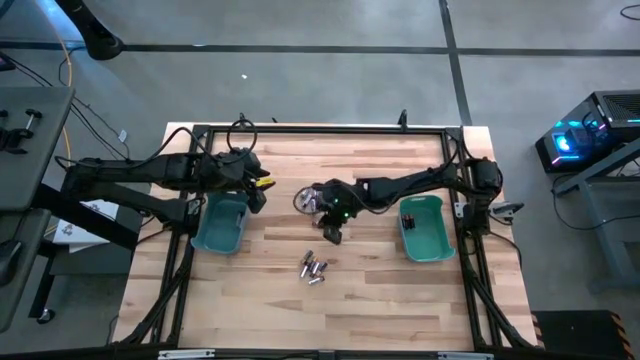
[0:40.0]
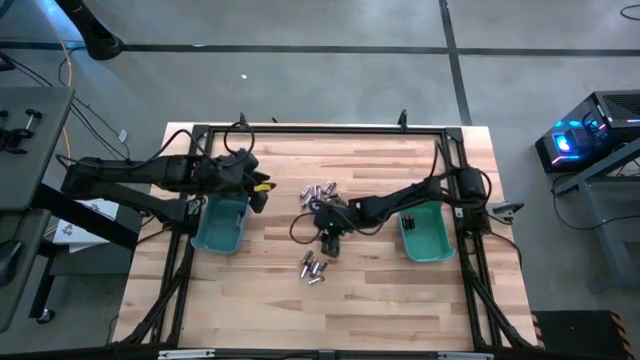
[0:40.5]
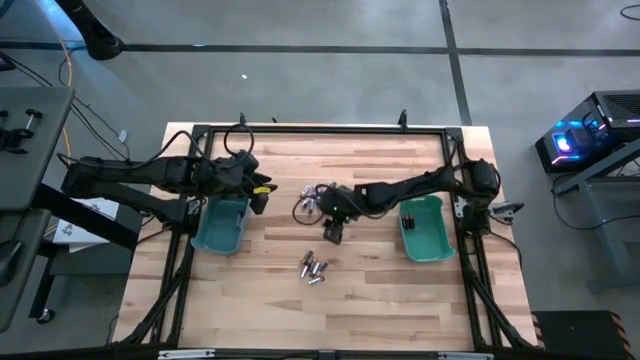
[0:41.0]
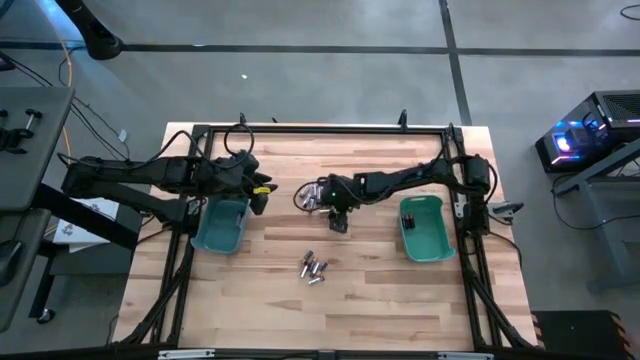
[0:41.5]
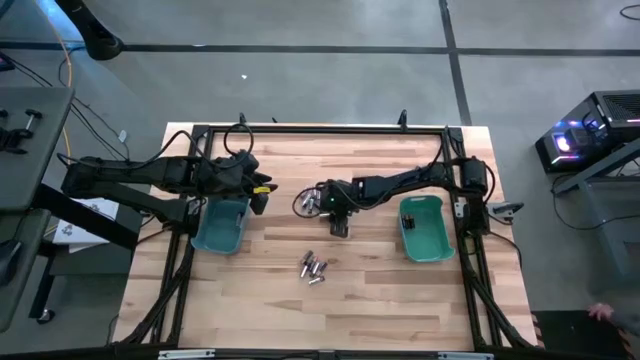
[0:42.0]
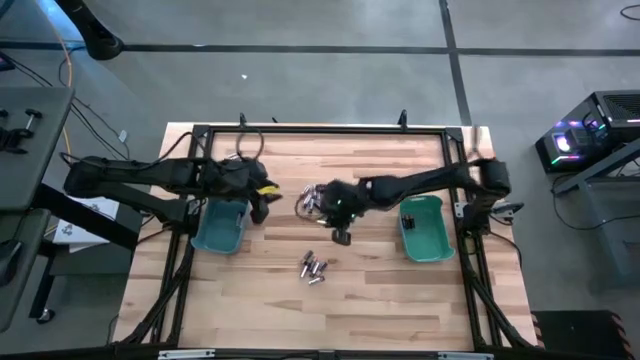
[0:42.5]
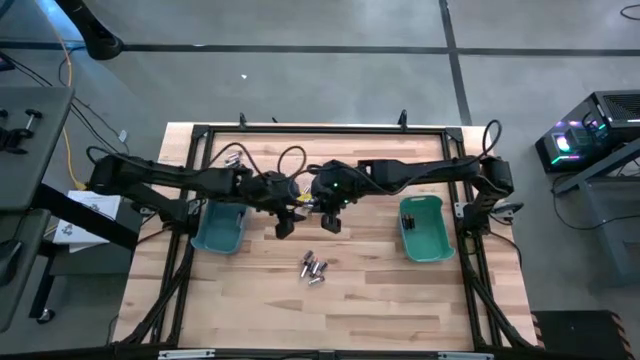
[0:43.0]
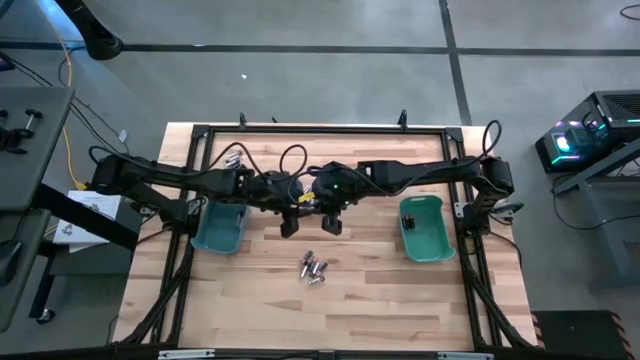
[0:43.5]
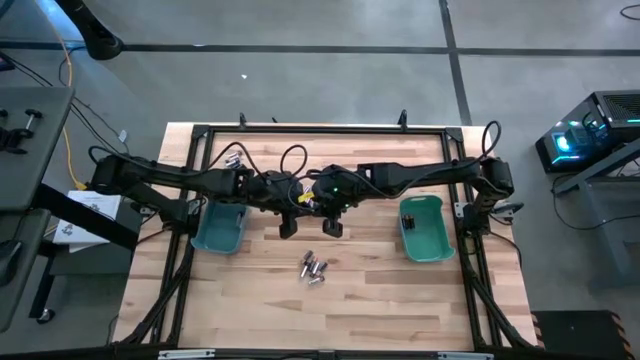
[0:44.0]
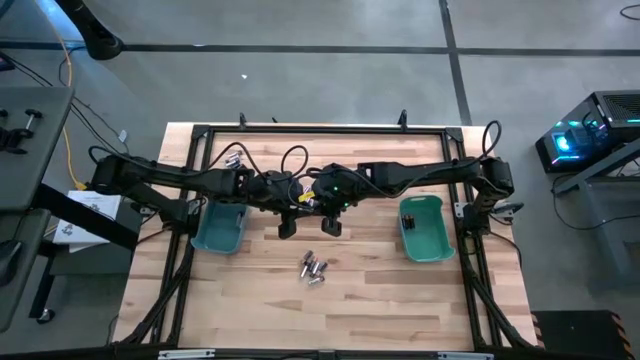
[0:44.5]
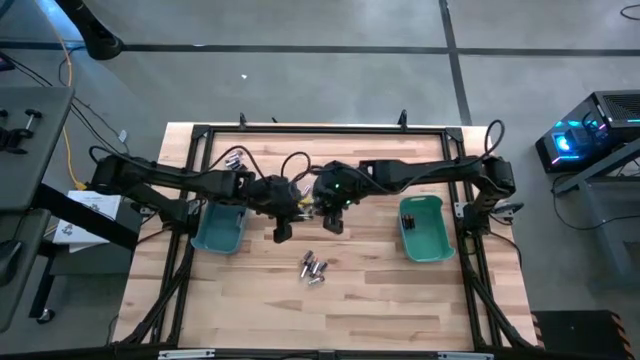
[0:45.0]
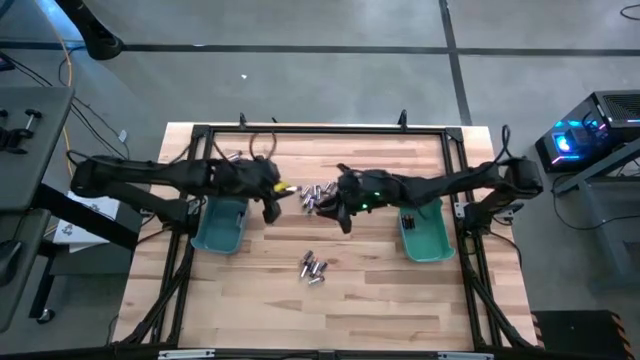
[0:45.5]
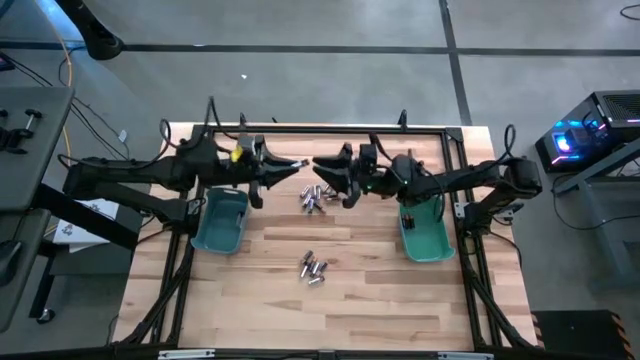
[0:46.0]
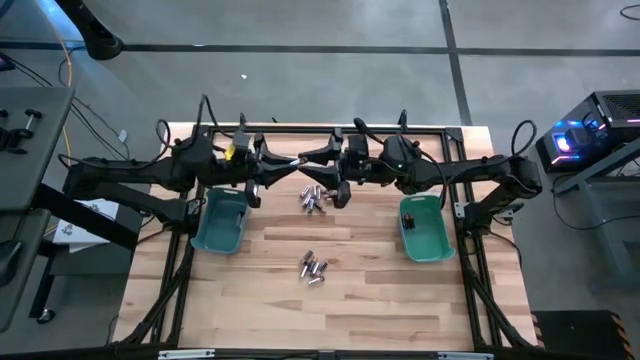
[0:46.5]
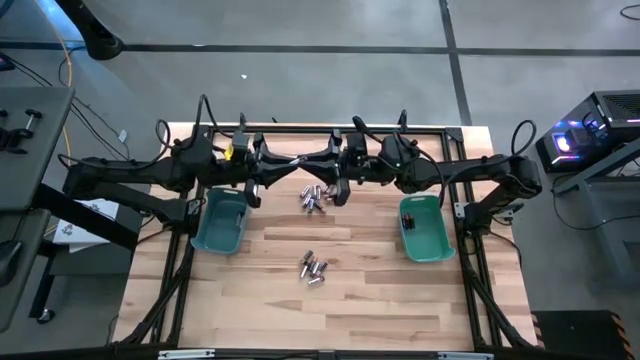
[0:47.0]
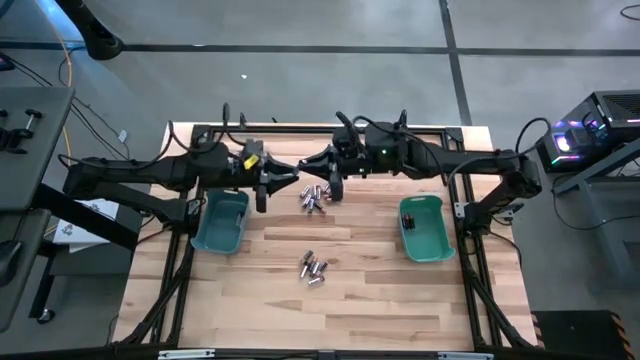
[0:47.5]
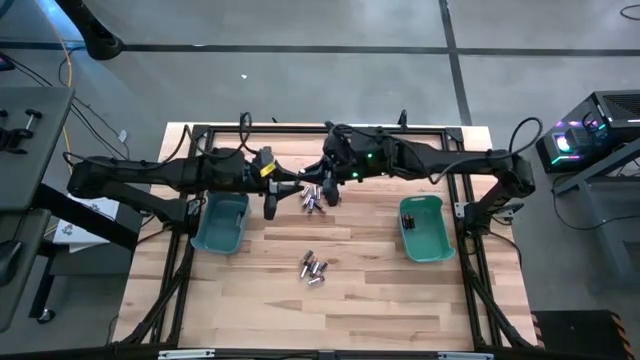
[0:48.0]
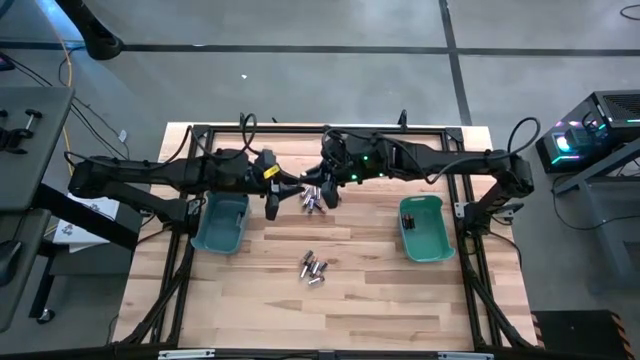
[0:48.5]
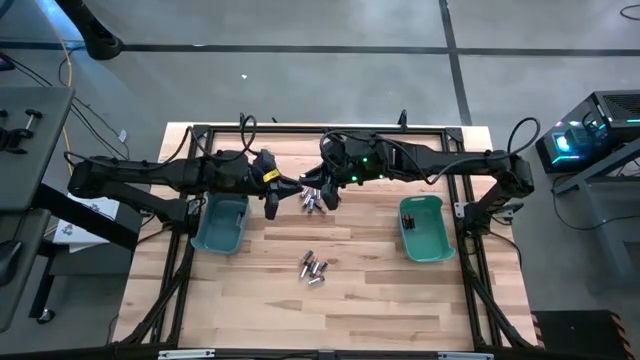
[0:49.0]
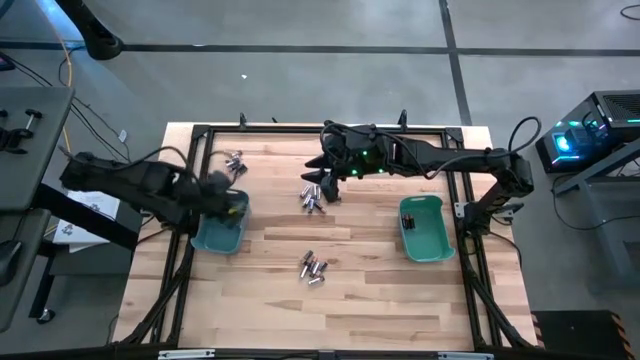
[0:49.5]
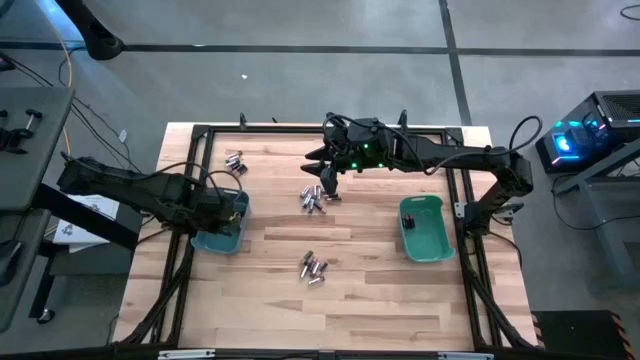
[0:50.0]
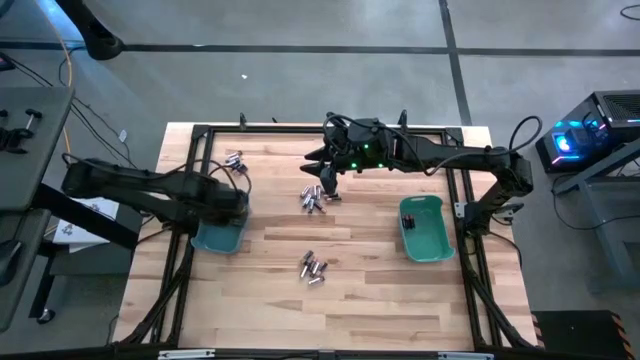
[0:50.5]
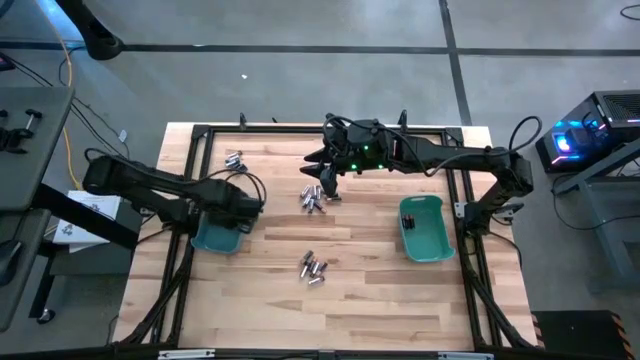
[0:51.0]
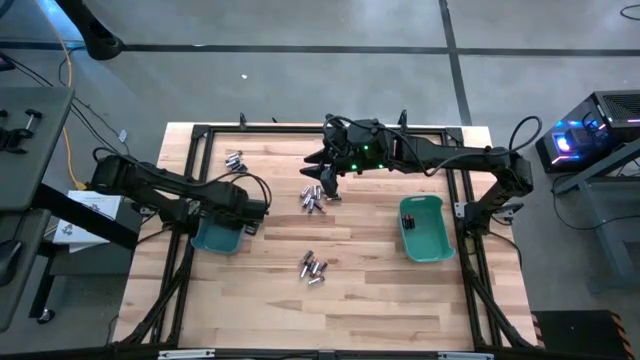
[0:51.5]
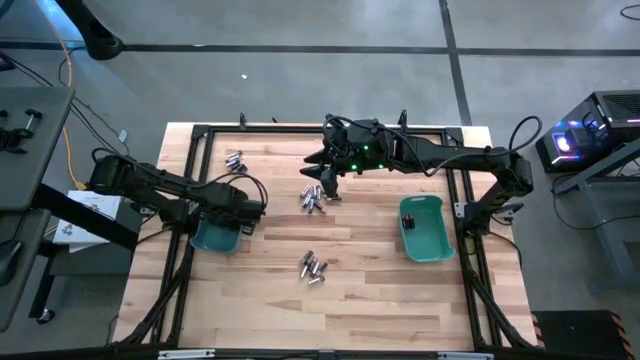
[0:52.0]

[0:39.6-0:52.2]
Task: Sort batteries
Put the silver battery into the blue bin

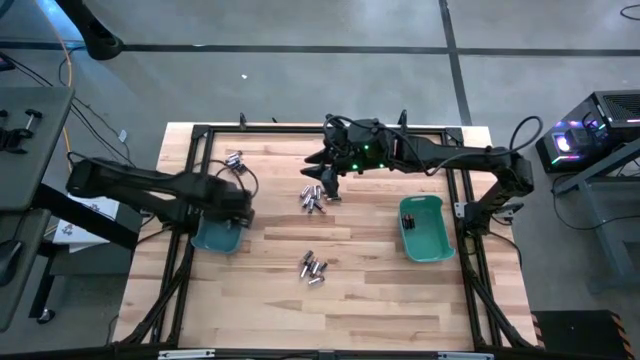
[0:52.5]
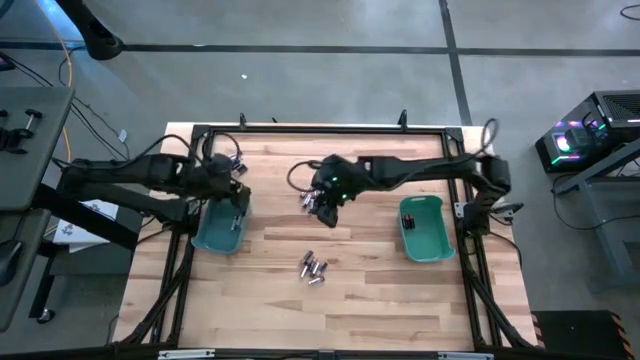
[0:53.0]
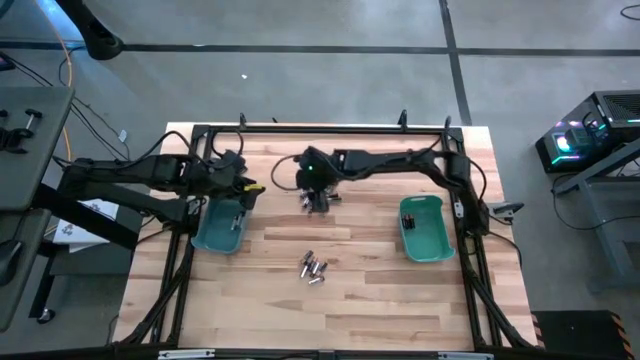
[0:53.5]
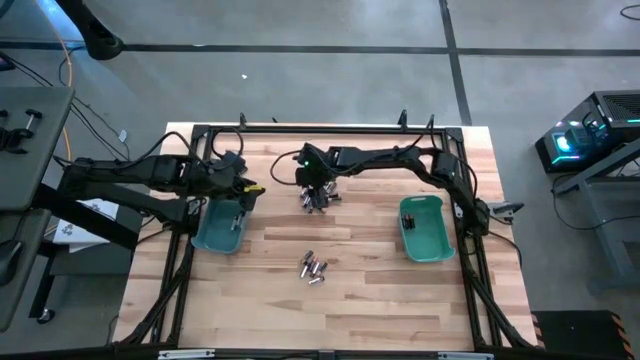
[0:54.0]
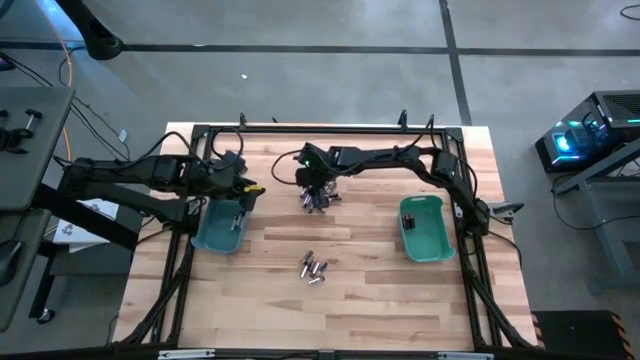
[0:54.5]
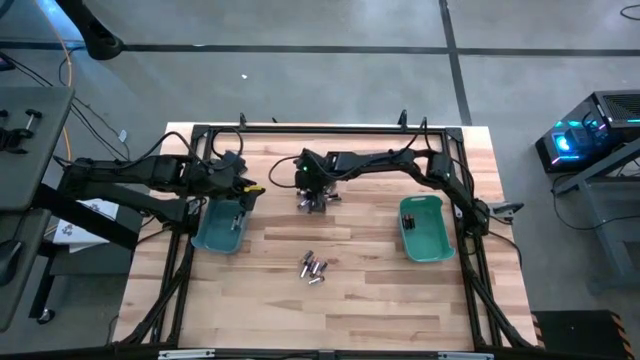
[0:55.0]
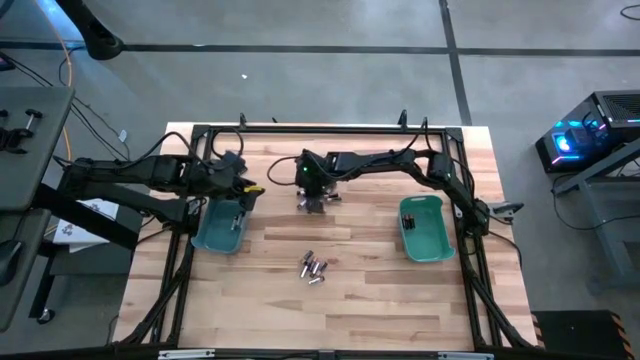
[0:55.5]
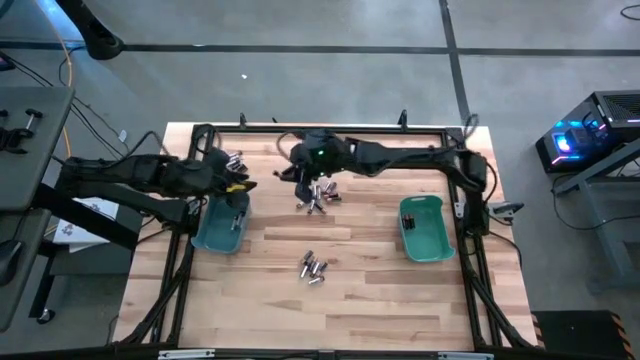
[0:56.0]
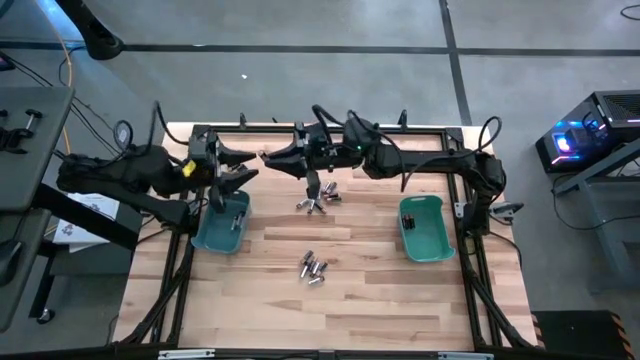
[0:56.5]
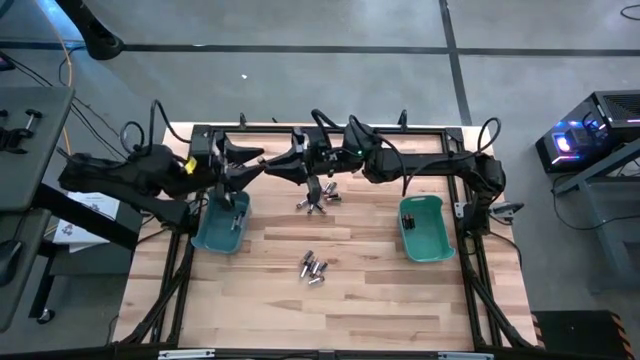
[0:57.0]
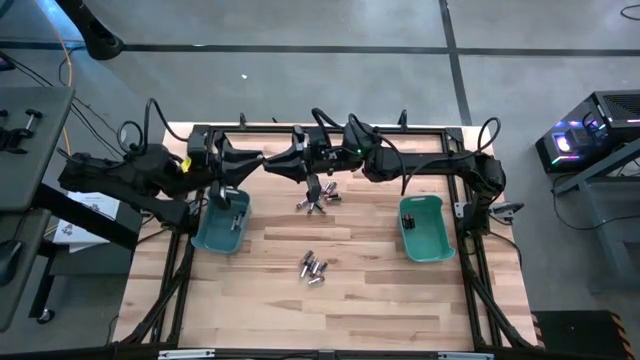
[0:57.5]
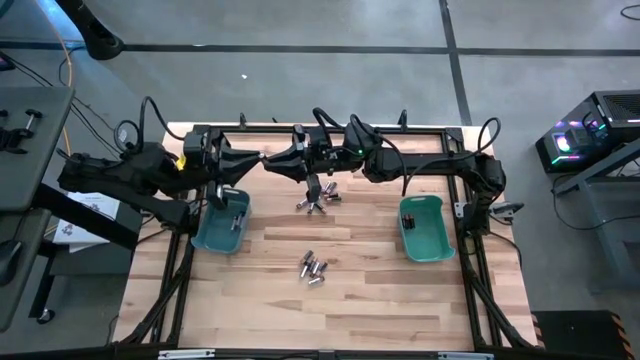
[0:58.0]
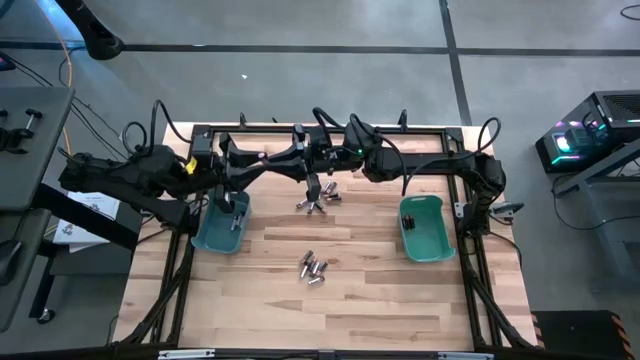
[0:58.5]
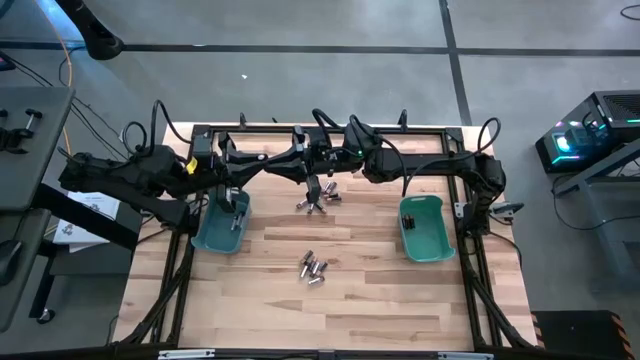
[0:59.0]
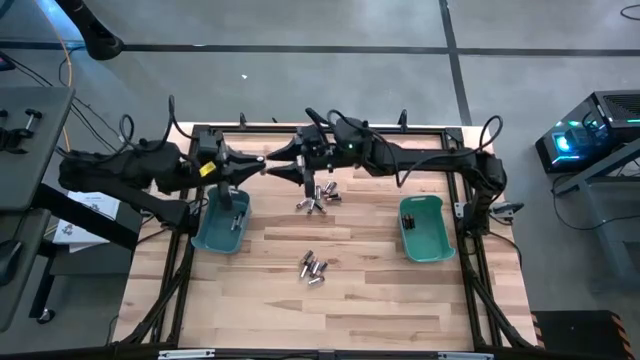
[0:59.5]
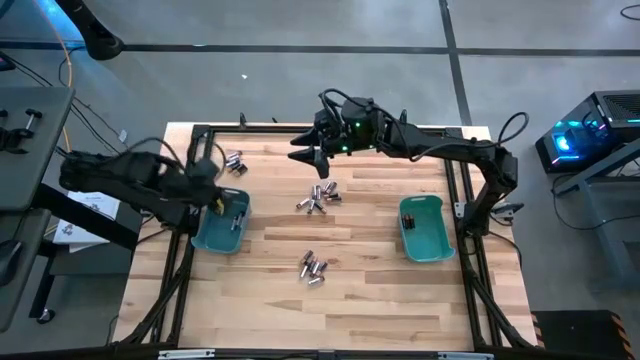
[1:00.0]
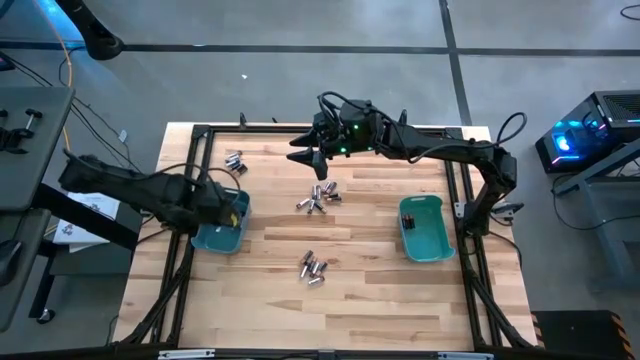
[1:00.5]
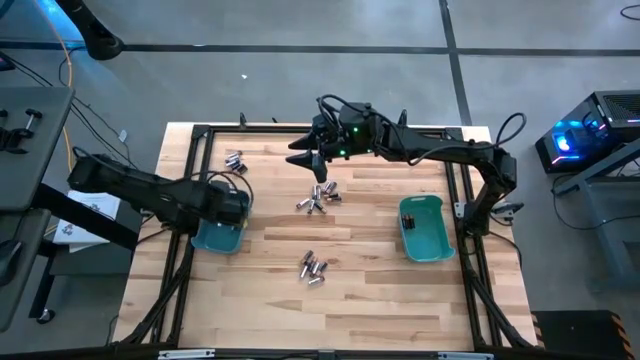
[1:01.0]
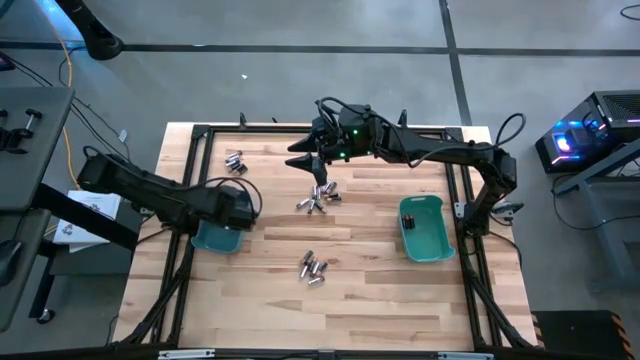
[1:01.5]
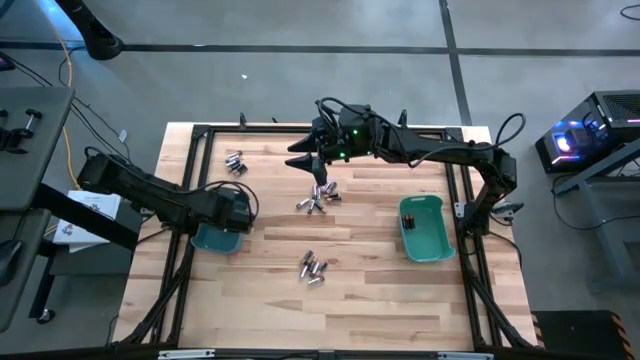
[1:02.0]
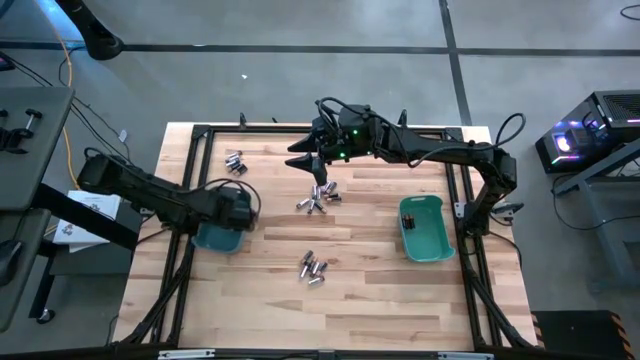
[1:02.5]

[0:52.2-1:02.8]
Put the silver battery into the blue bin
